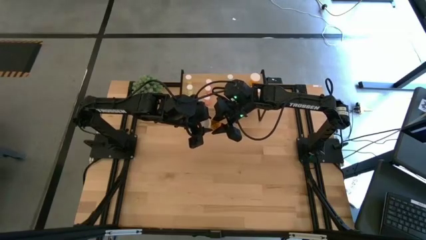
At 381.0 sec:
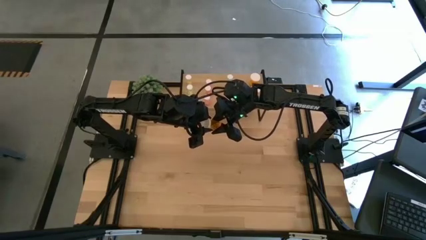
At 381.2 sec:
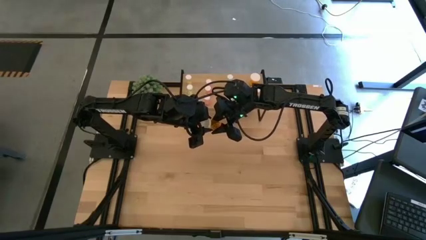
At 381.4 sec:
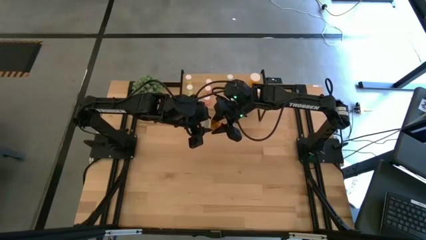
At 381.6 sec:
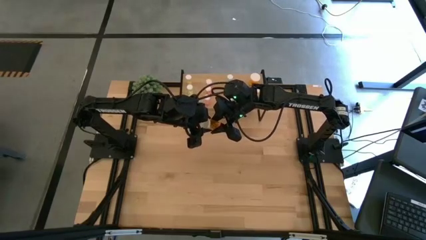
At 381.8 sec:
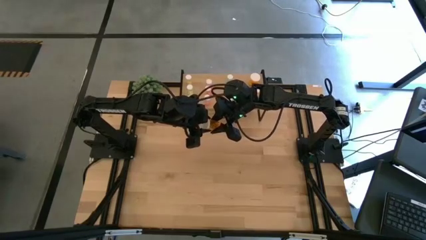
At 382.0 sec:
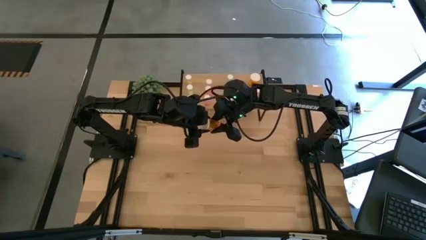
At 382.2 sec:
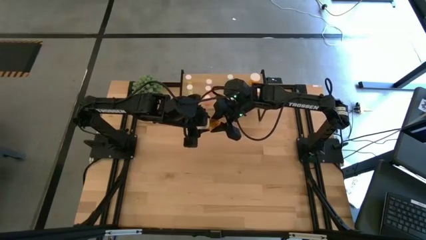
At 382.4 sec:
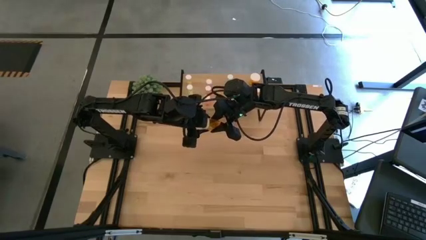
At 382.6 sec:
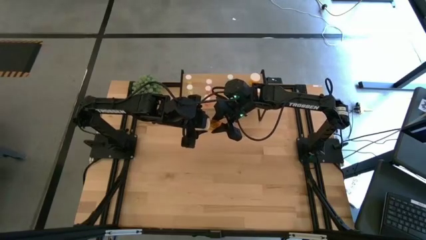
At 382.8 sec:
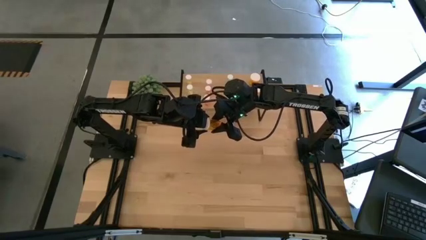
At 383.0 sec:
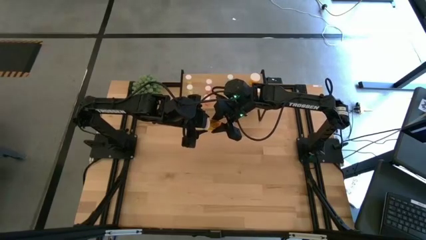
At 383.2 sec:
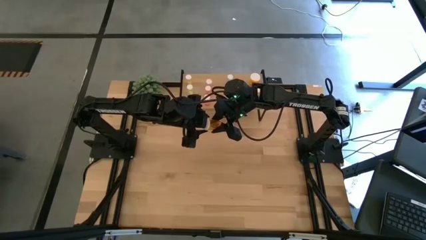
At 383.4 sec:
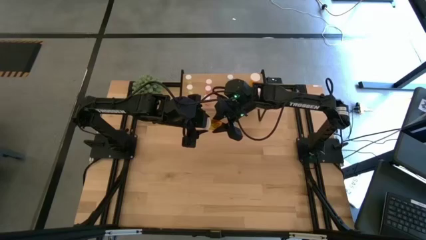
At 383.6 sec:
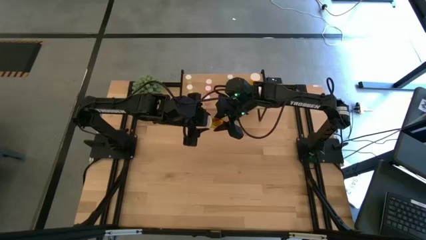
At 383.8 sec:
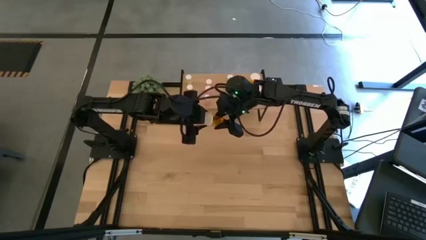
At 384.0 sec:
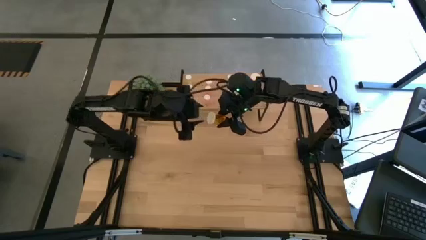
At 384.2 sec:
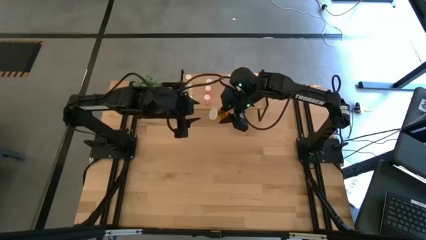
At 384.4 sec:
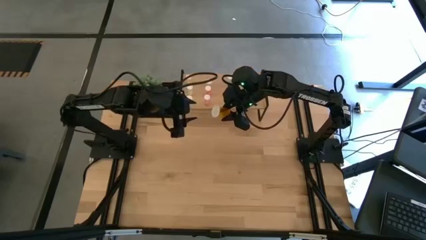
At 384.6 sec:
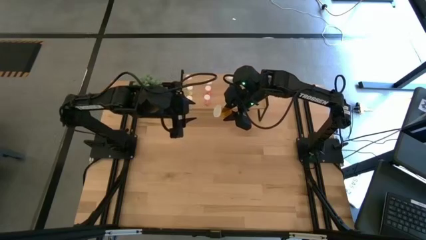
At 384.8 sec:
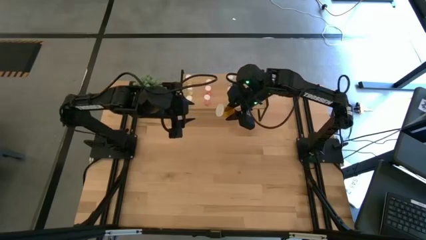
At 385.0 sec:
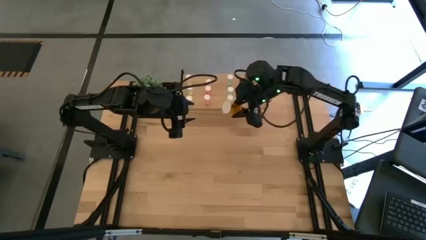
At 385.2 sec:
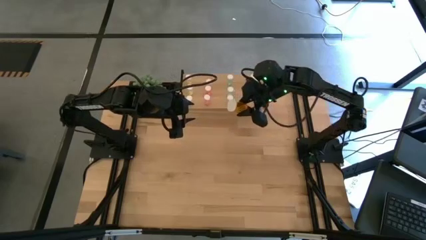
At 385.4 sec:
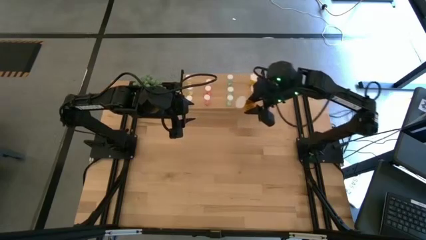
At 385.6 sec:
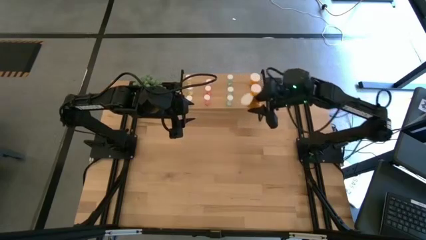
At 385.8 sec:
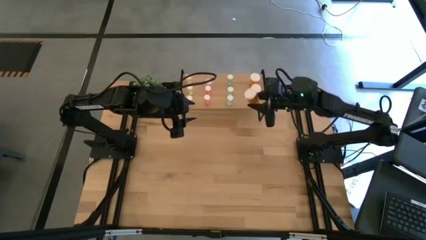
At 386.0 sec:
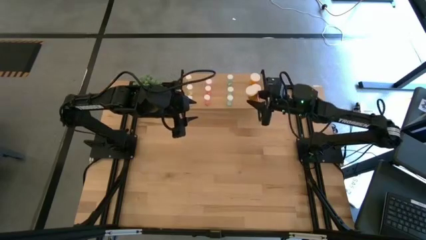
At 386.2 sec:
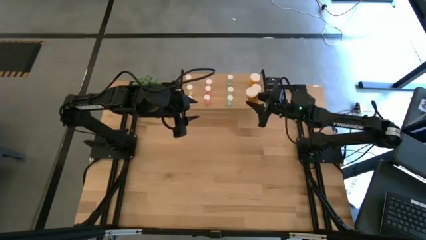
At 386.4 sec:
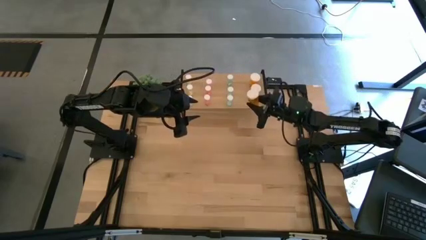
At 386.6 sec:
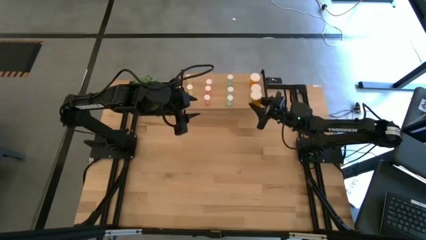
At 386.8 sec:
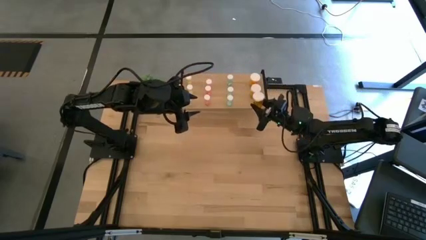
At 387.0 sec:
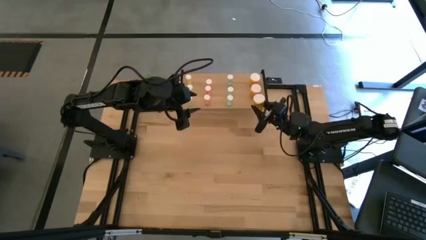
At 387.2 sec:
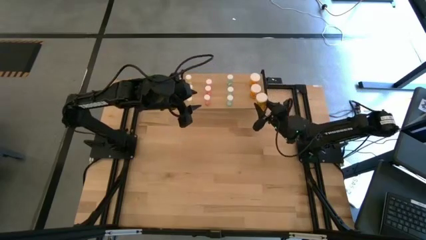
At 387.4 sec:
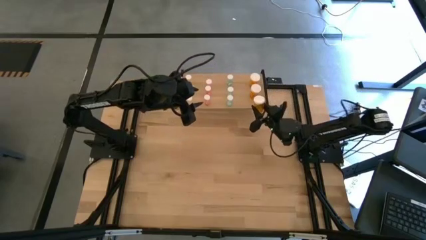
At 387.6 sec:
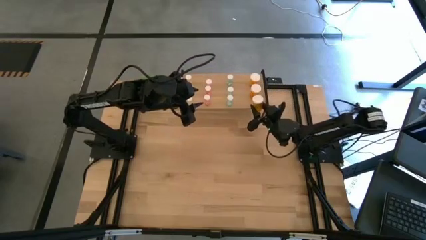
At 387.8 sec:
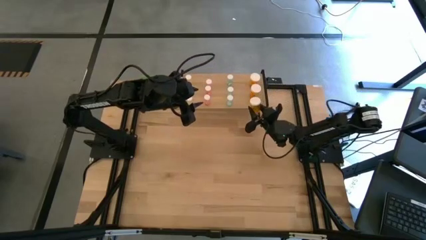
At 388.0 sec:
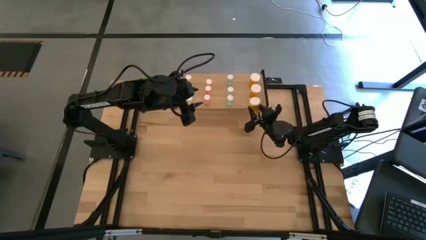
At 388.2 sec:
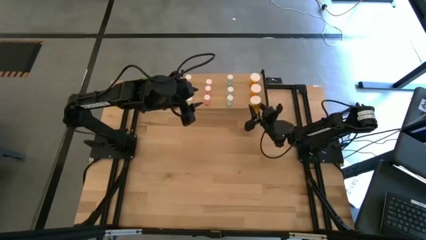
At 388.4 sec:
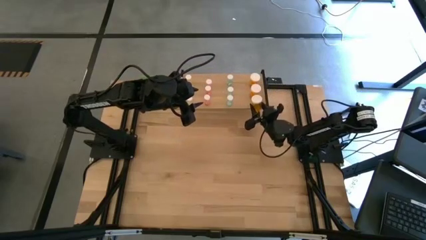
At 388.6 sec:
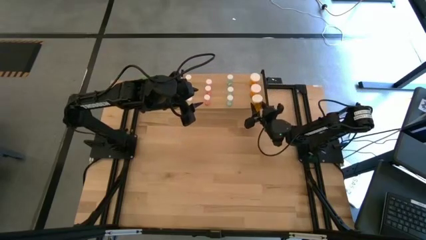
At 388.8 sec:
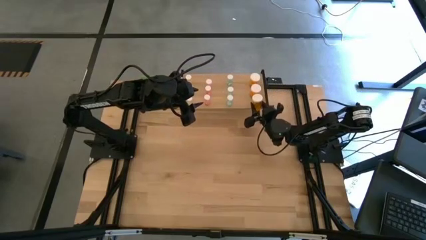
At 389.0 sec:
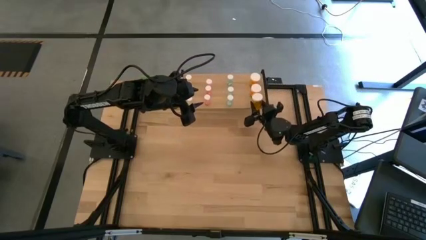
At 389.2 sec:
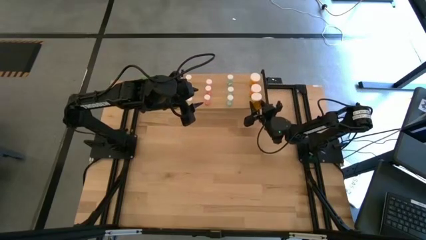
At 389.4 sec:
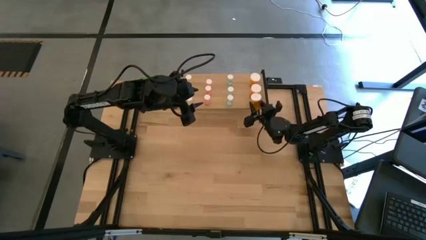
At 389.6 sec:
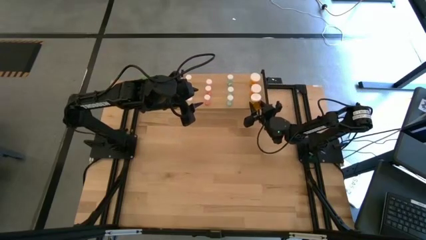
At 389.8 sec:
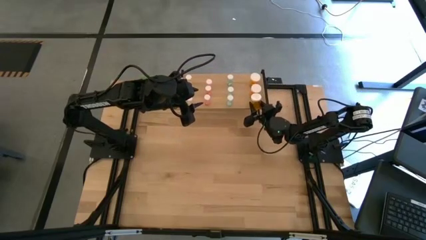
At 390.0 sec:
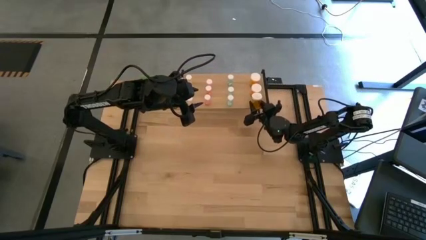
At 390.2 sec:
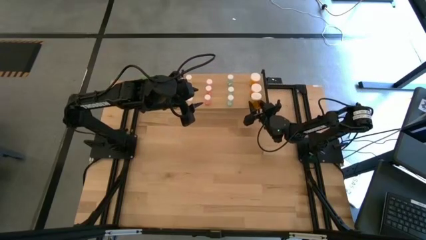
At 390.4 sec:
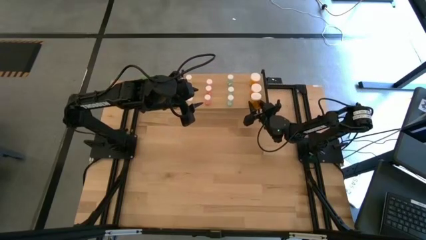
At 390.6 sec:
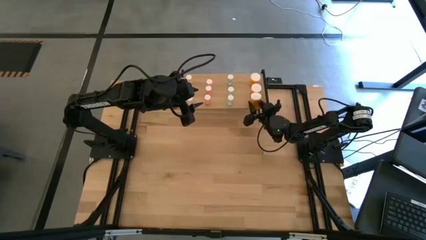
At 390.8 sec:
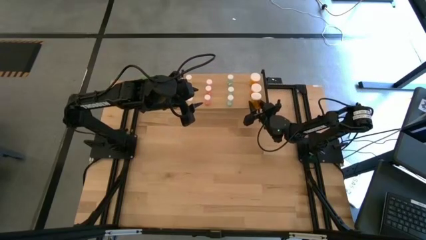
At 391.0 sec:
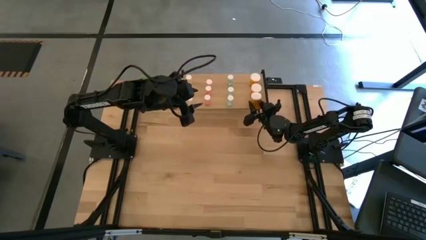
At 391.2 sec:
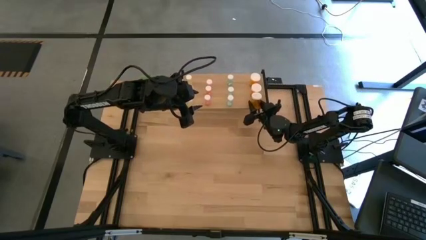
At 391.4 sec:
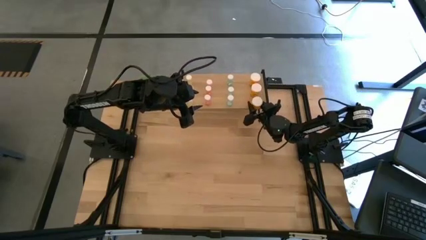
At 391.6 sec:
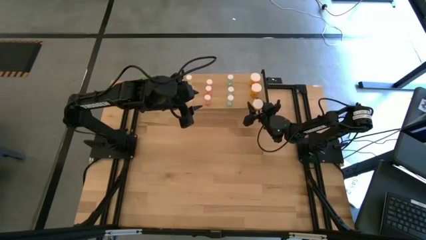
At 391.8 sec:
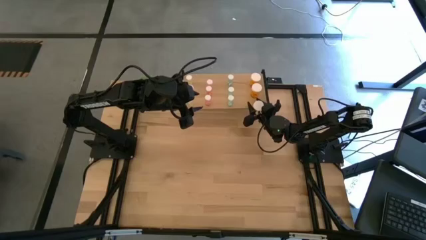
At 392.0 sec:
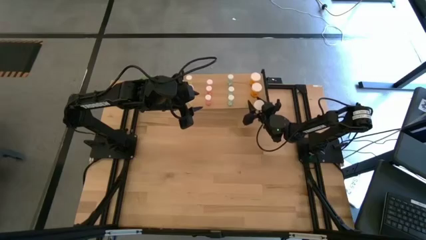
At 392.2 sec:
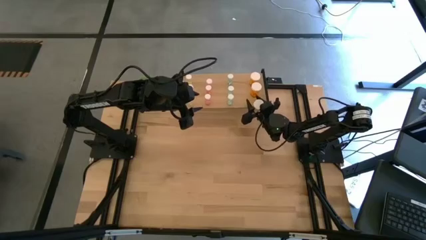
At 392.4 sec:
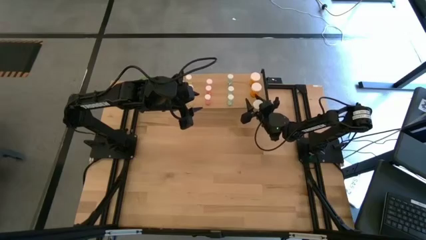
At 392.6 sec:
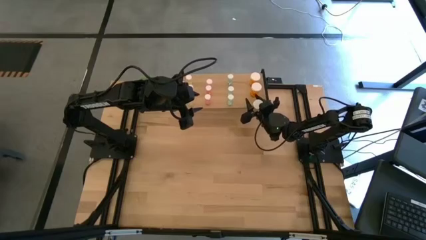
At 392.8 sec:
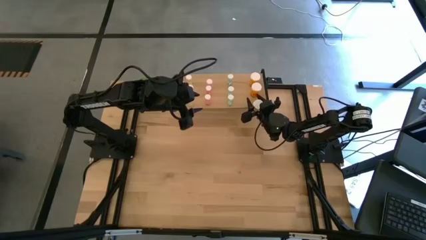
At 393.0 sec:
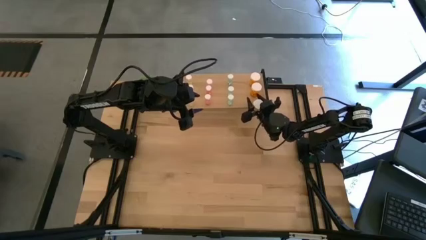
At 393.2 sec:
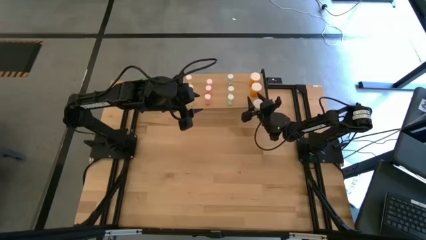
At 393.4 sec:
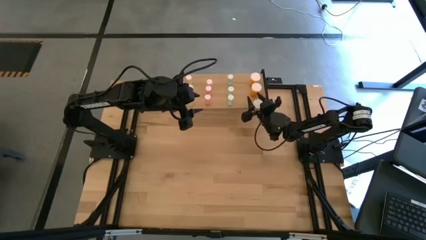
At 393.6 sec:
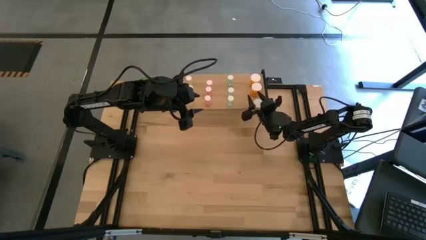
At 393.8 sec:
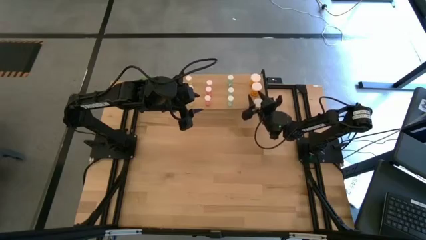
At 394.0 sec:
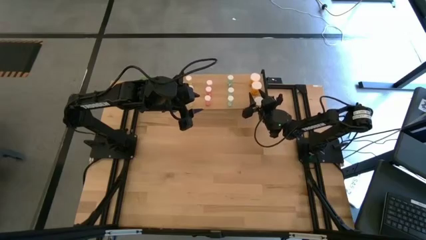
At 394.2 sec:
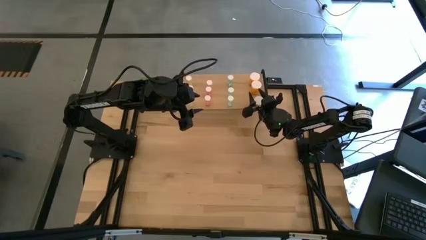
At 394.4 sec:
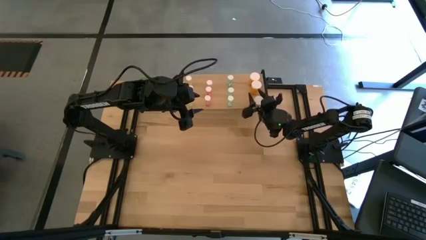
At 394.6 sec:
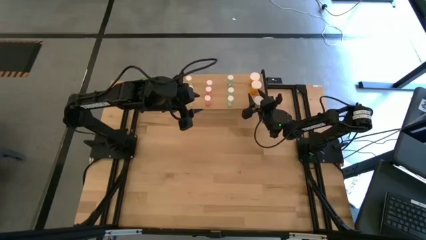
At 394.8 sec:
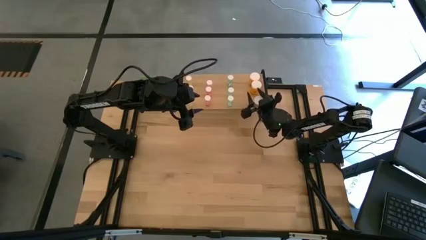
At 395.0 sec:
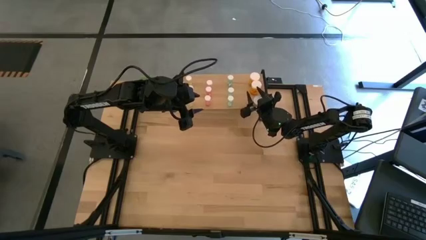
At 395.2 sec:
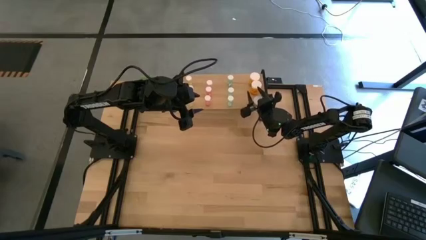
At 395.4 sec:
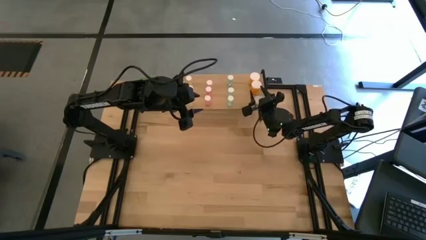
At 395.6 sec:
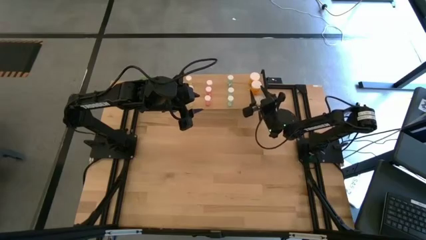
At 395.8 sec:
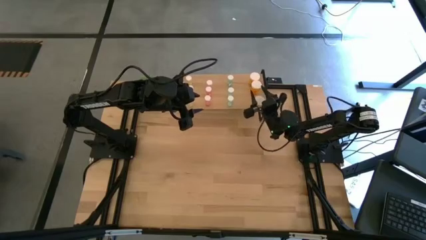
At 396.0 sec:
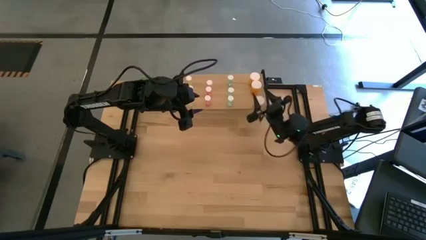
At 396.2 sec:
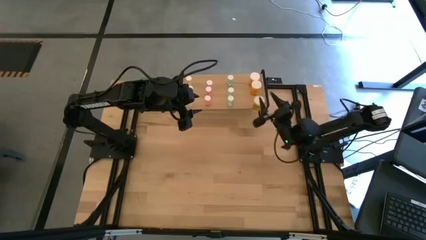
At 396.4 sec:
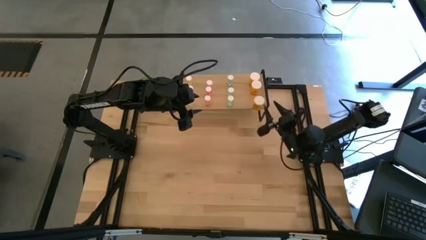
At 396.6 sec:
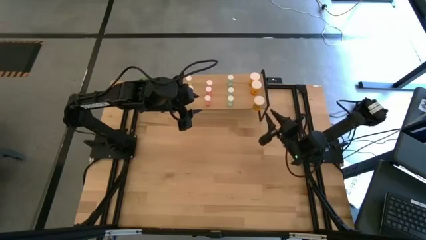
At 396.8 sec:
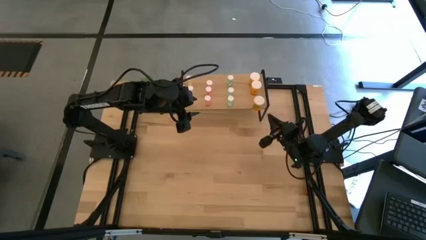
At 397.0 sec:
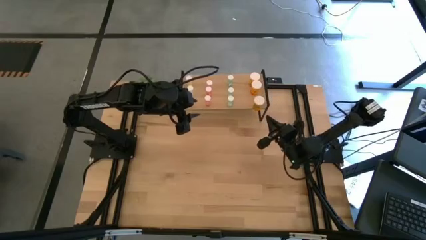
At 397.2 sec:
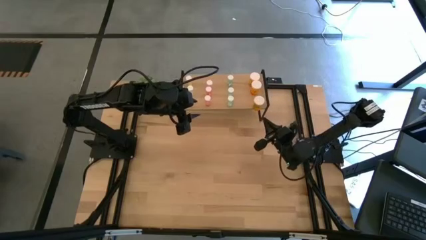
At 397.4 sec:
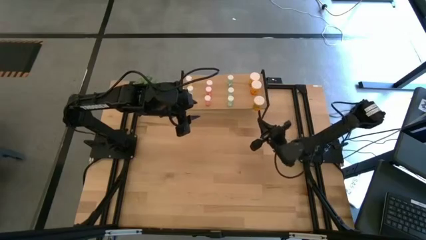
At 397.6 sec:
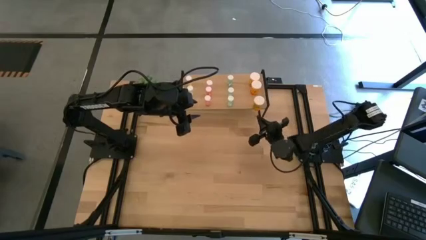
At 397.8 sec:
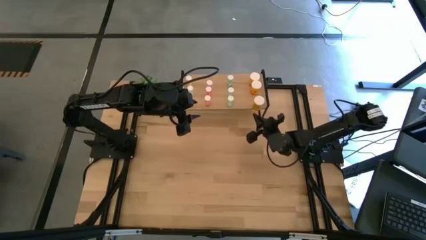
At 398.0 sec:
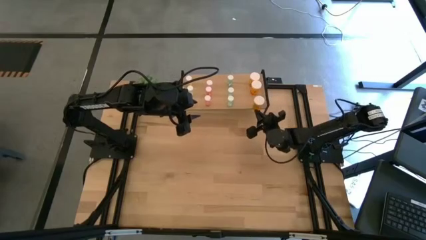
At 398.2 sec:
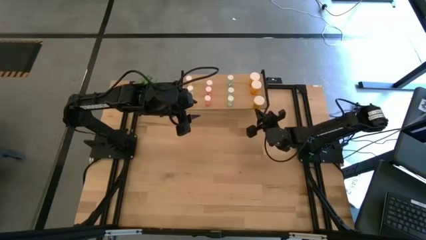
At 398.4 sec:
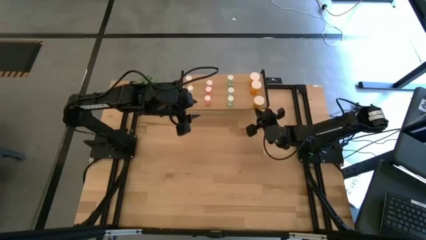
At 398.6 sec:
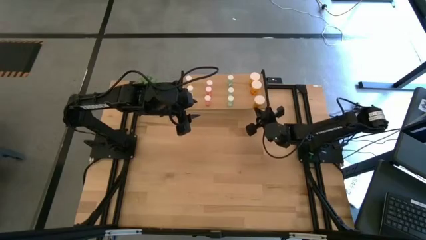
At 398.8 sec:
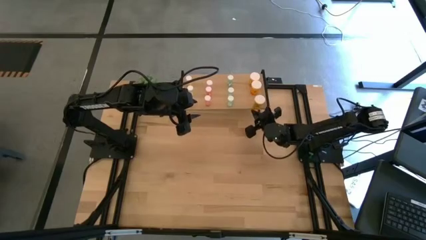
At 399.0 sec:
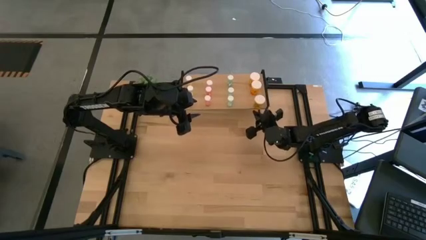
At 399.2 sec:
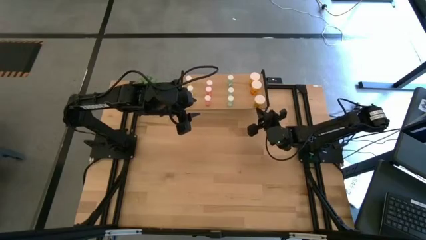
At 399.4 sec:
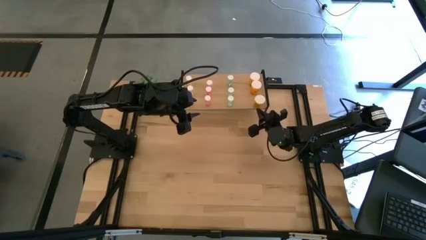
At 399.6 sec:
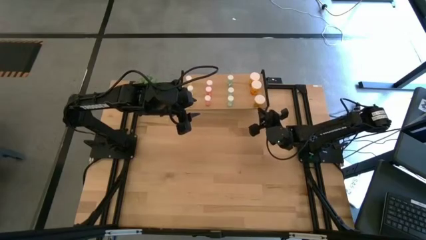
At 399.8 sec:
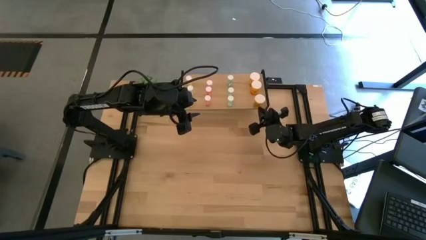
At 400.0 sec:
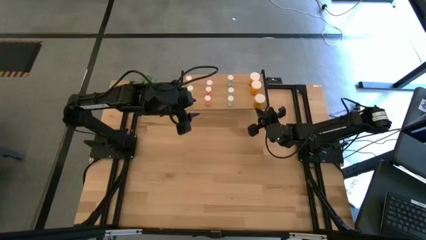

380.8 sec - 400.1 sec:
Task: Pick and place medicine bottles onto shelf by color
Put the orange pill bottle on the shelf aligned with the other orange pill bottles
